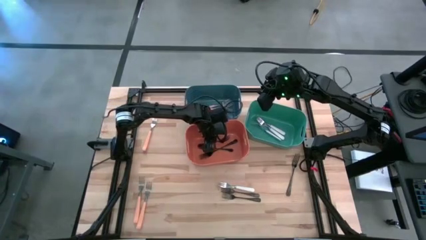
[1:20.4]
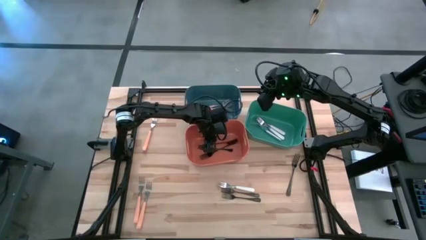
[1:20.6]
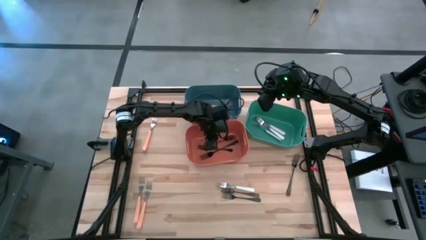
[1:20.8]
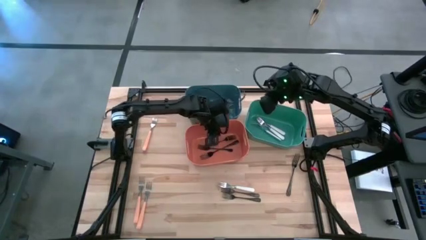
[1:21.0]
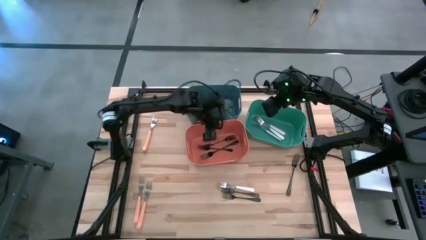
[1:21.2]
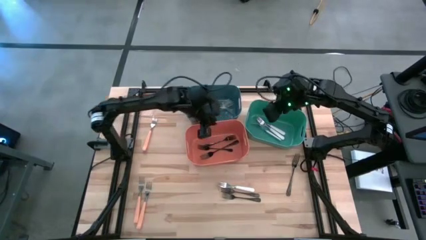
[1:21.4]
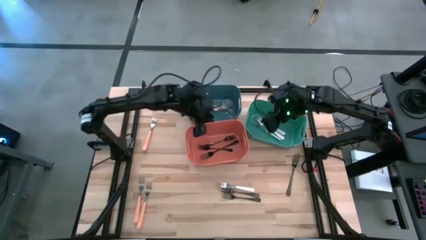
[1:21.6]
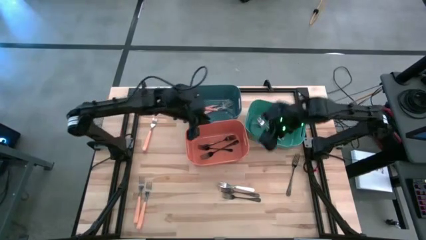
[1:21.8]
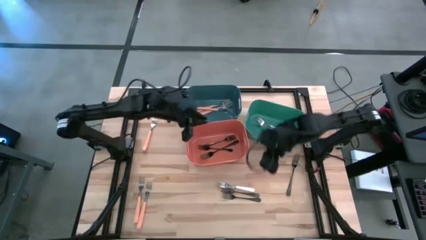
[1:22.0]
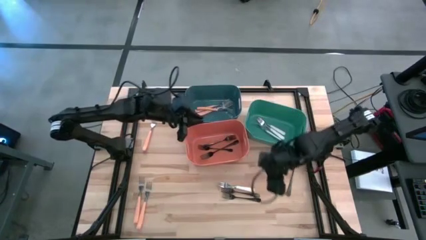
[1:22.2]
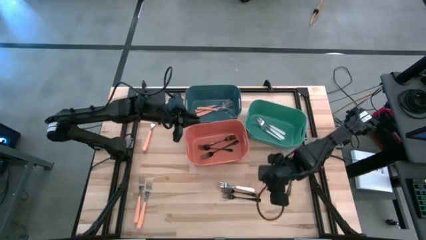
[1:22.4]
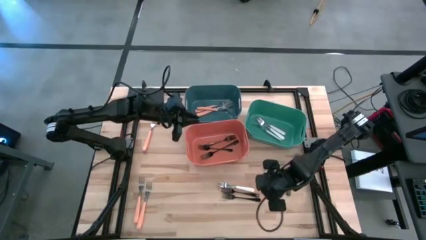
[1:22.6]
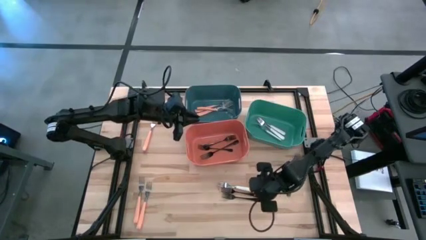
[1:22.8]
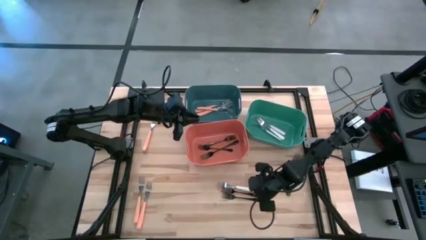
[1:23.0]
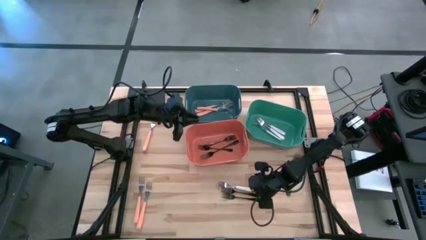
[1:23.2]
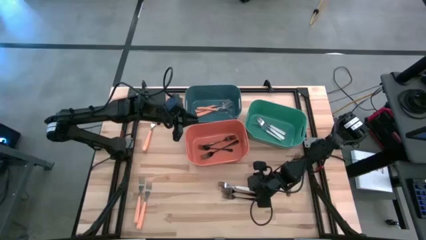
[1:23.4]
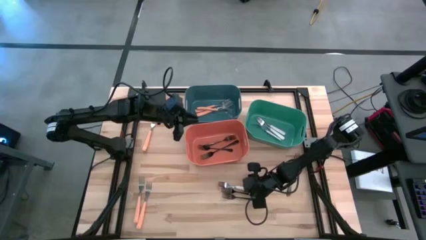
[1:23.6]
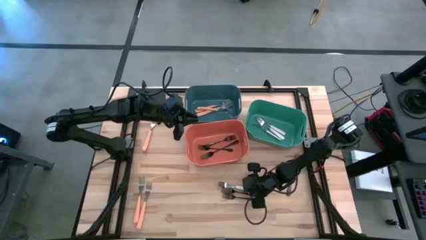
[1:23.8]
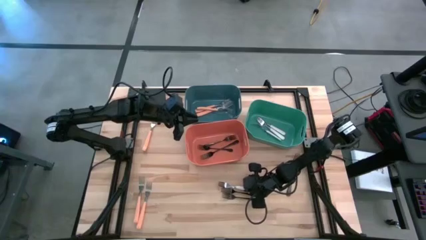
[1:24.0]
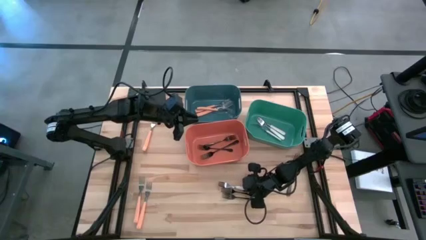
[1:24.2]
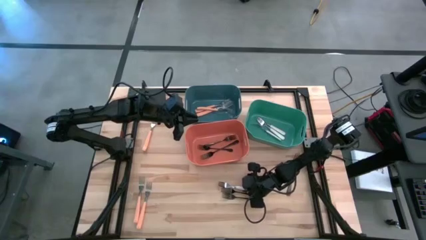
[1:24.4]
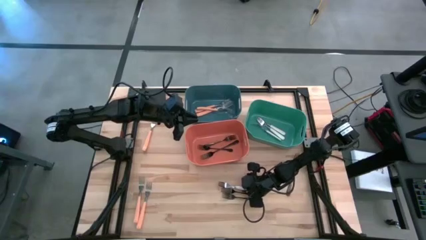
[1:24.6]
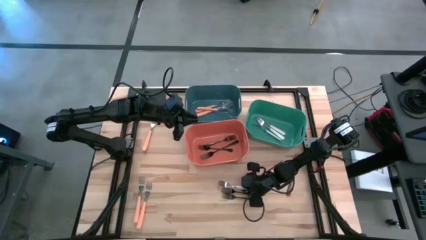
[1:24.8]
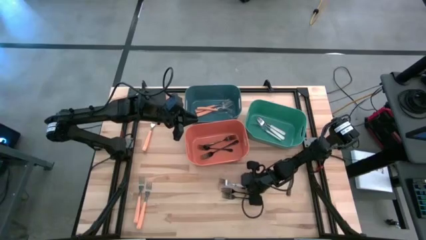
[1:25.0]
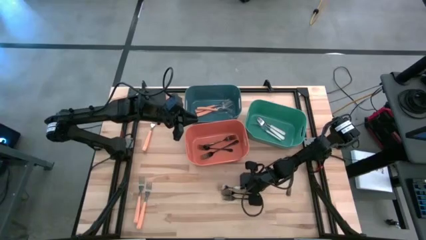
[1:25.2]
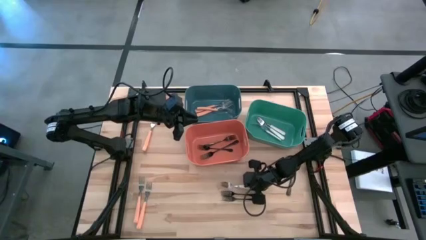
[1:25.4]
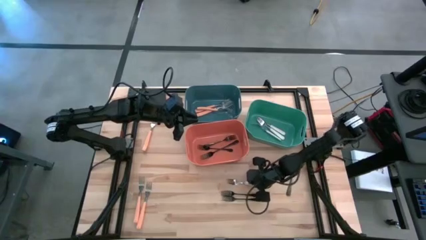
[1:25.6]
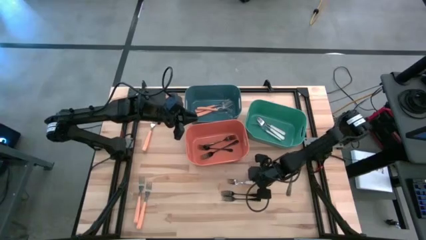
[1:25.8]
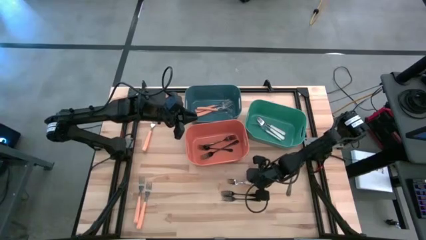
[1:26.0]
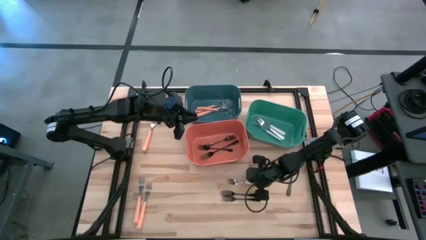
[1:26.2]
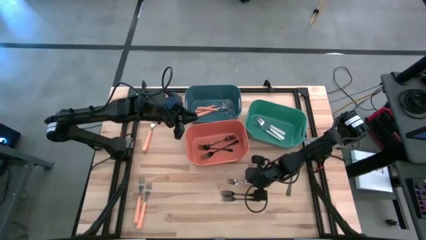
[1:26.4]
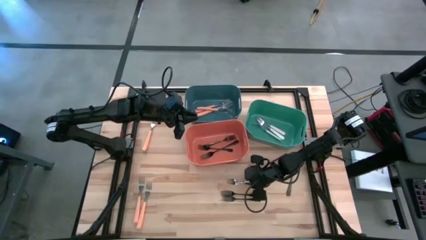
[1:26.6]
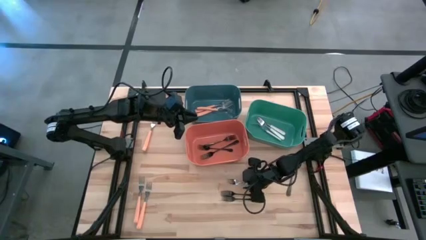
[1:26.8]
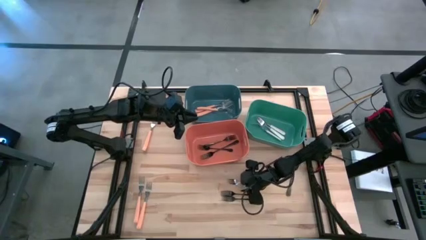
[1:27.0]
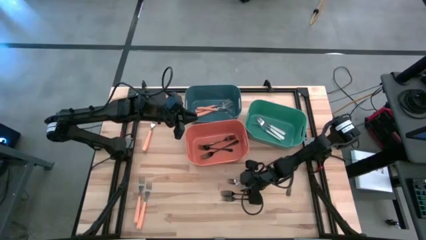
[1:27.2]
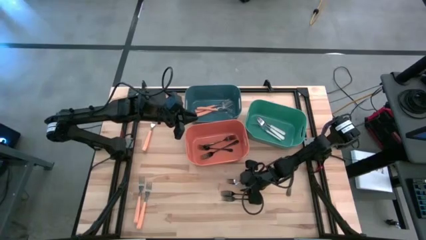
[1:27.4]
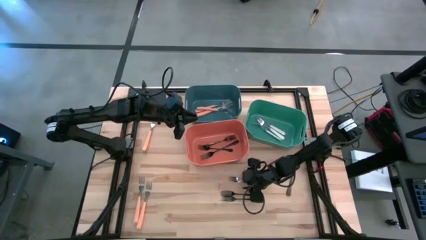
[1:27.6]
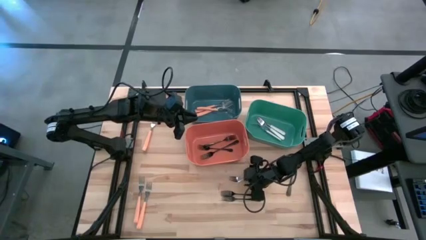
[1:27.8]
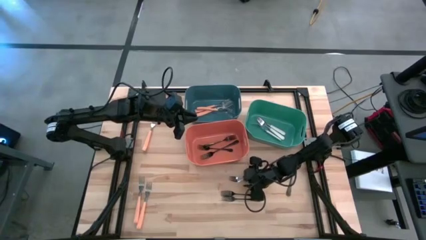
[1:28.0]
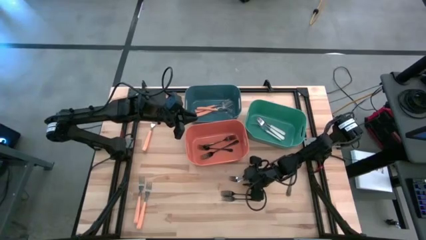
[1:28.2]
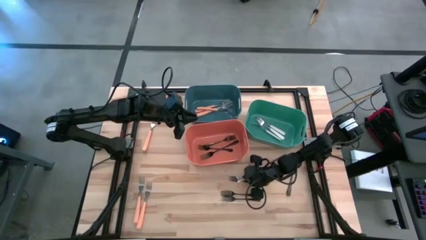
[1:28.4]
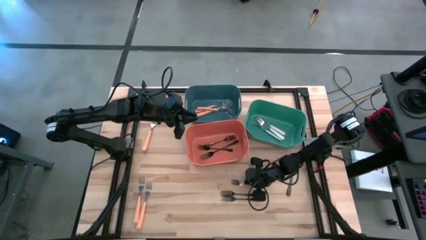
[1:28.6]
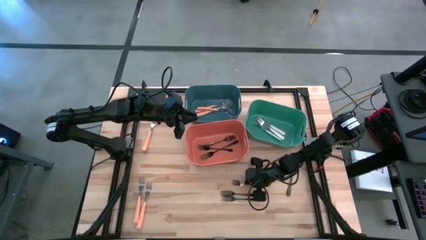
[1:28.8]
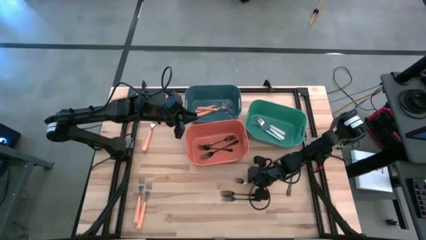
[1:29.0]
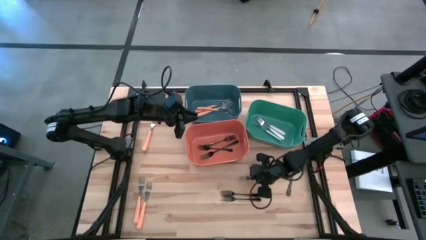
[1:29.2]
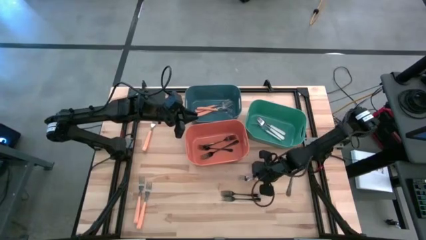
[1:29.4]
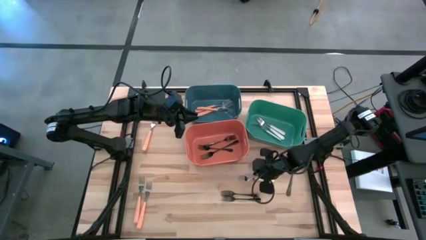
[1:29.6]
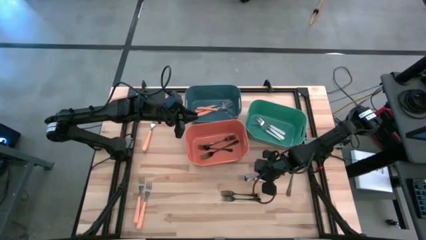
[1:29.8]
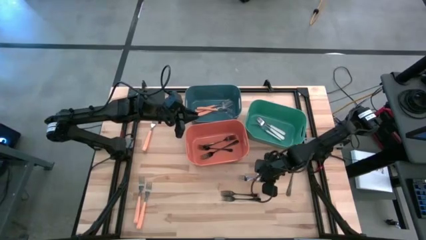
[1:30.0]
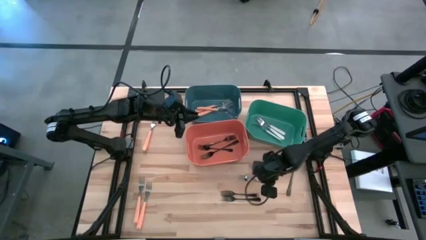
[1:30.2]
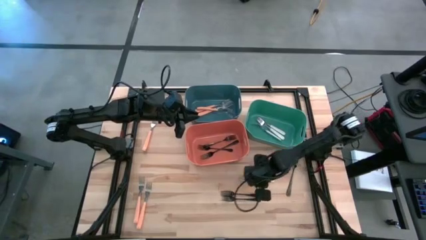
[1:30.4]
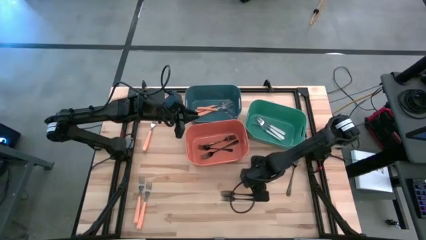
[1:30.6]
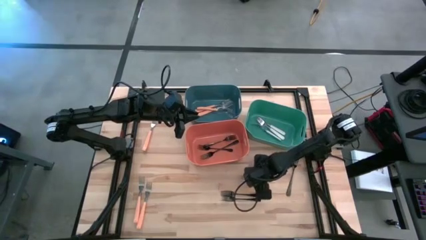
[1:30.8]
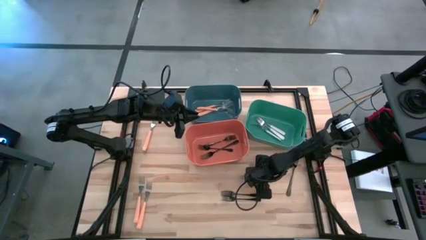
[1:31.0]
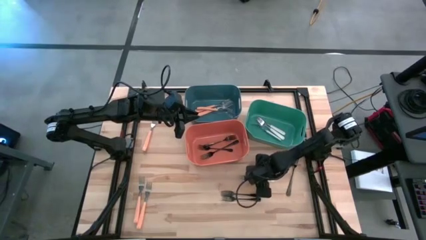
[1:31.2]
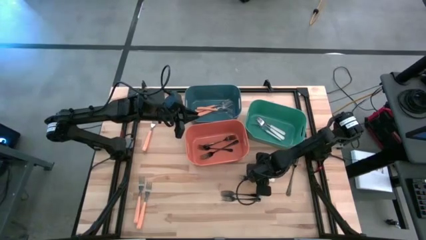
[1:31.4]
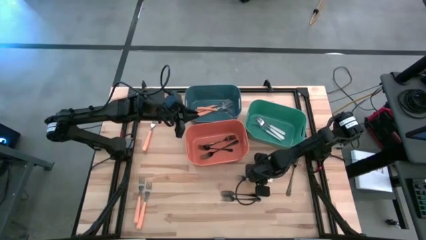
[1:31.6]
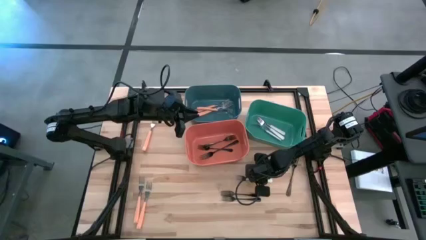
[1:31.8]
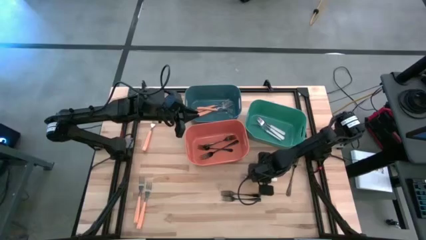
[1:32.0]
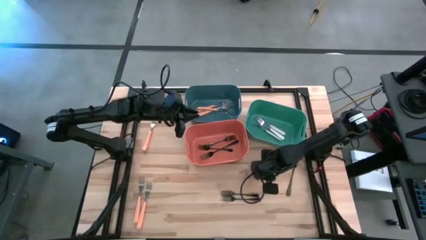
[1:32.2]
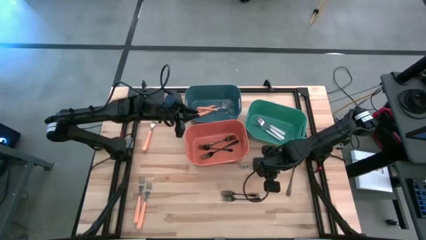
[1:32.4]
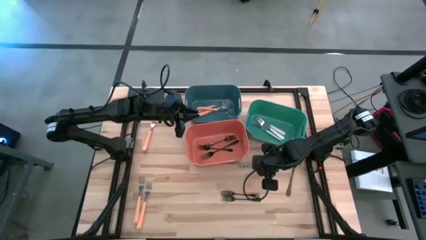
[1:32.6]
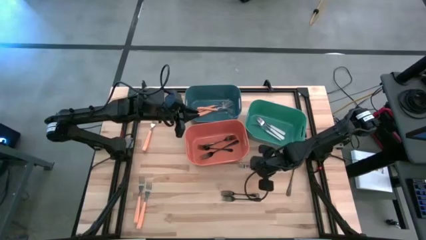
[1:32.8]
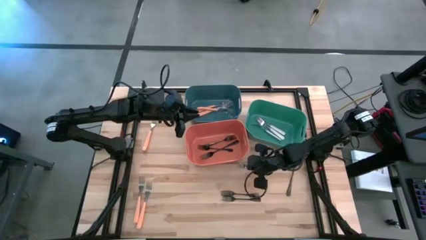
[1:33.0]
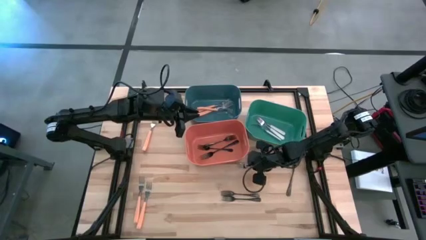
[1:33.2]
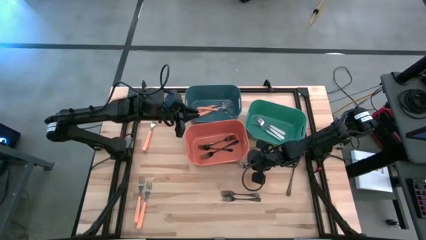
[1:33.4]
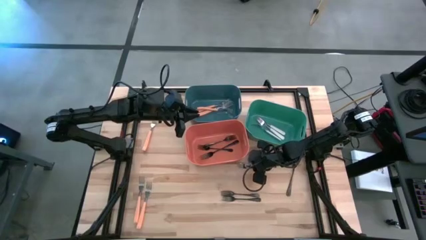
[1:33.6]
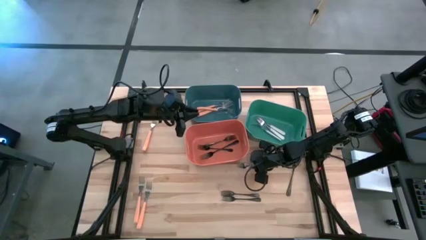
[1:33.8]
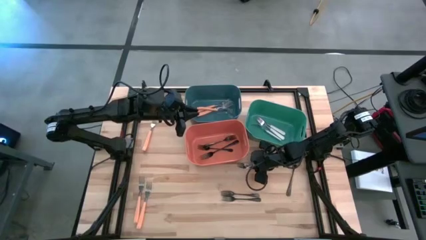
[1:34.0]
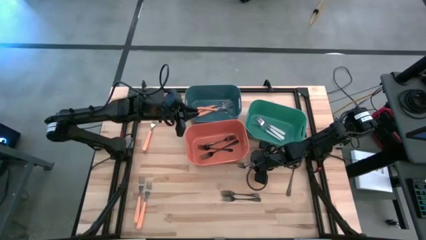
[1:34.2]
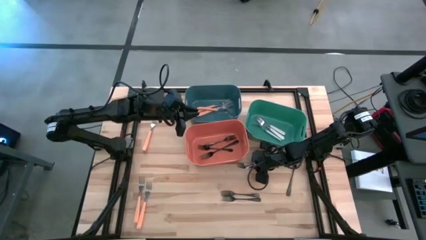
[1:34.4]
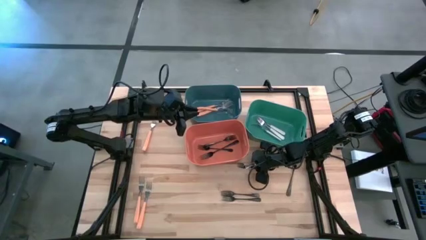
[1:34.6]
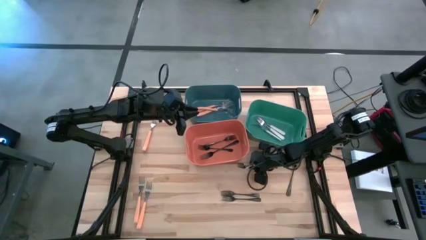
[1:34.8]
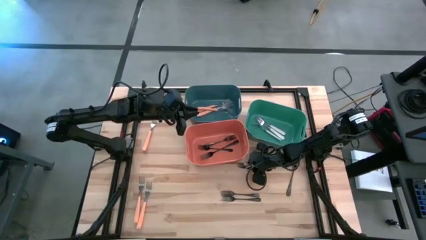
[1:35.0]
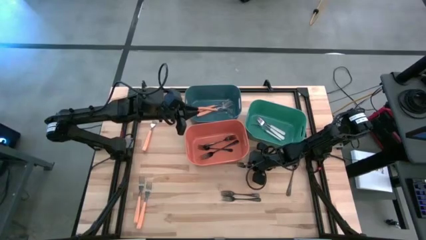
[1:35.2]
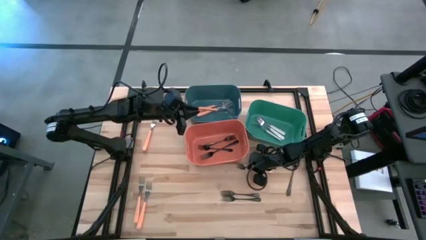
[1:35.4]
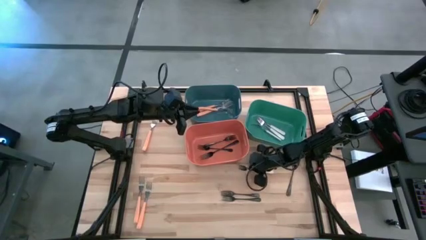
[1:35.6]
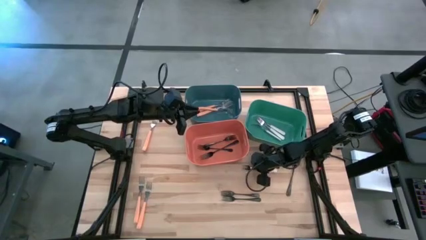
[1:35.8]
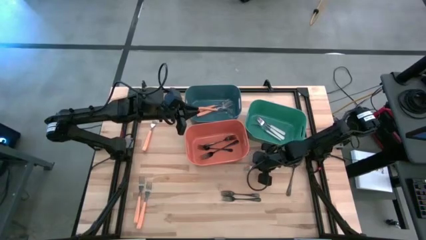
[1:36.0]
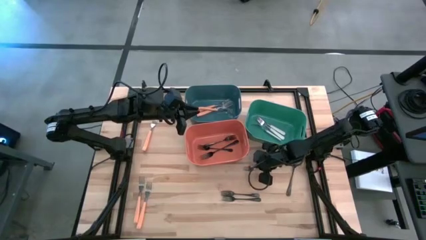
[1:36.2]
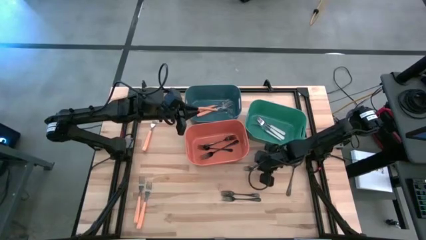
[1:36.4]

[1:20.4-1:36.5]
Task: Sort silverware by color (type)
Put the white fork into the green bin
